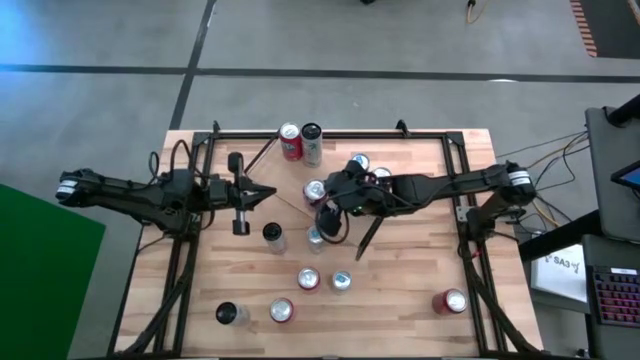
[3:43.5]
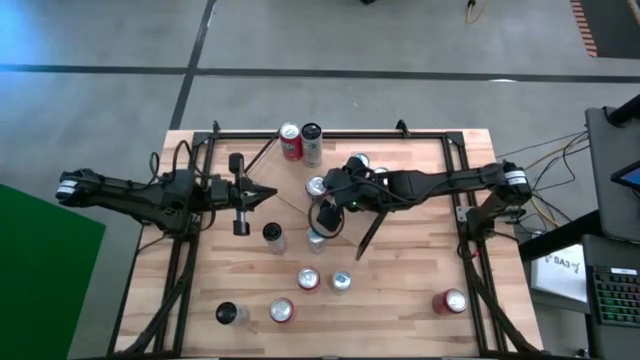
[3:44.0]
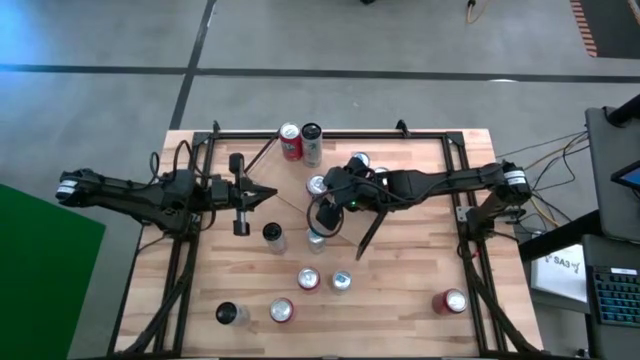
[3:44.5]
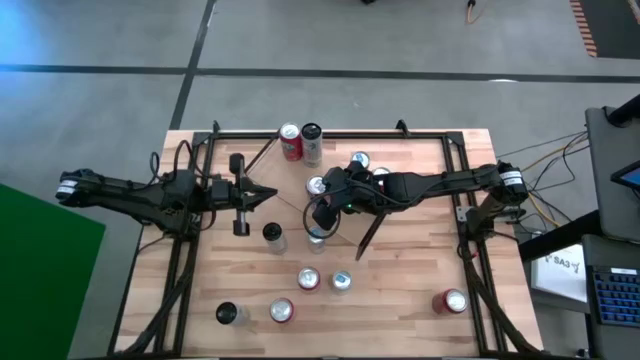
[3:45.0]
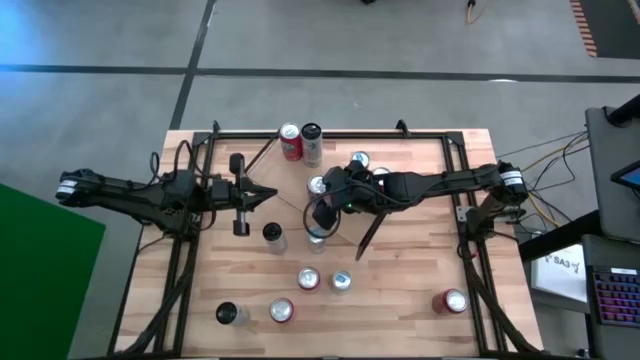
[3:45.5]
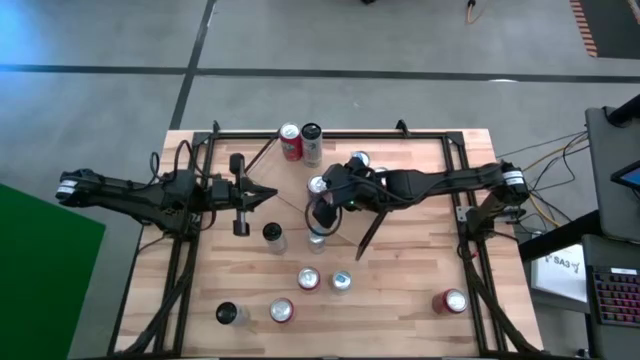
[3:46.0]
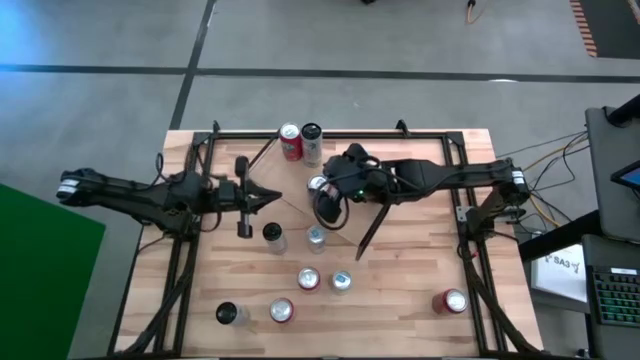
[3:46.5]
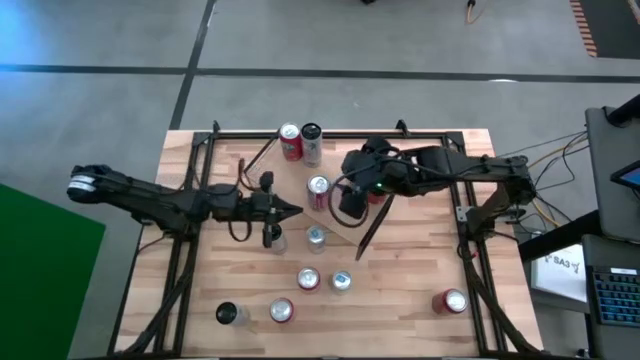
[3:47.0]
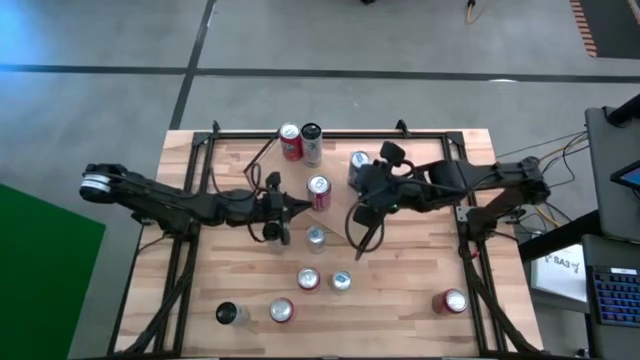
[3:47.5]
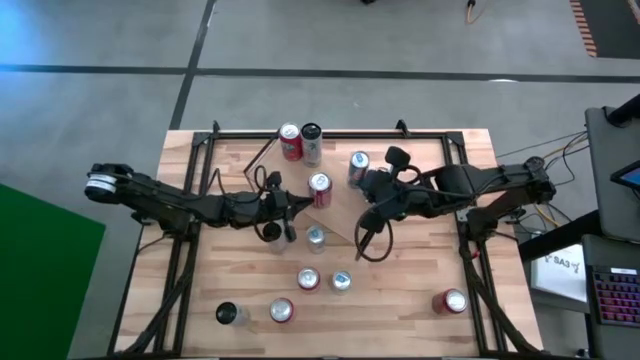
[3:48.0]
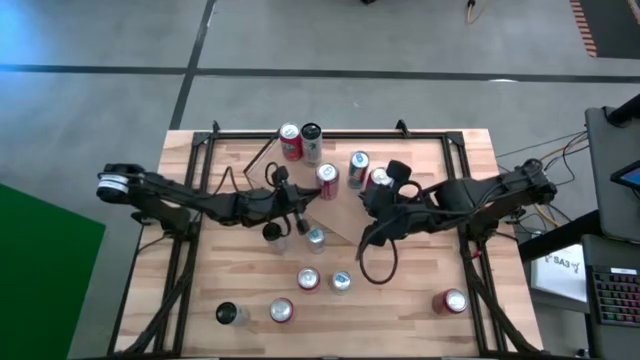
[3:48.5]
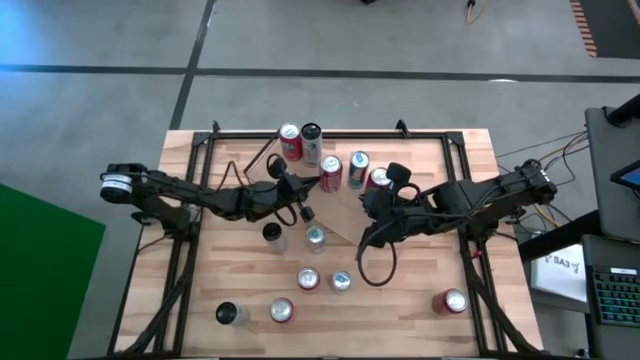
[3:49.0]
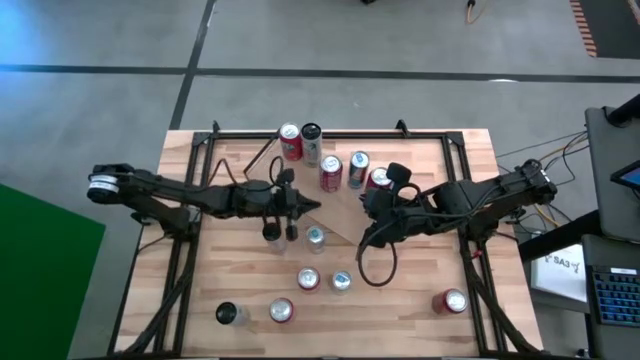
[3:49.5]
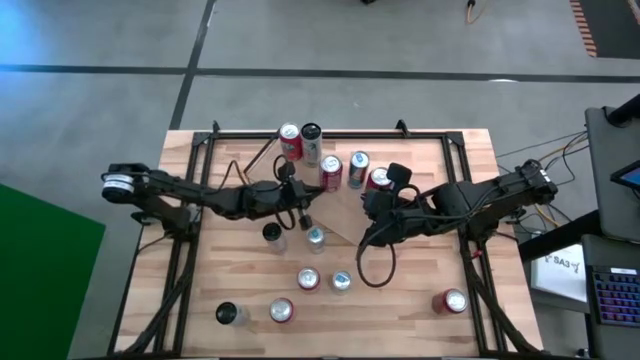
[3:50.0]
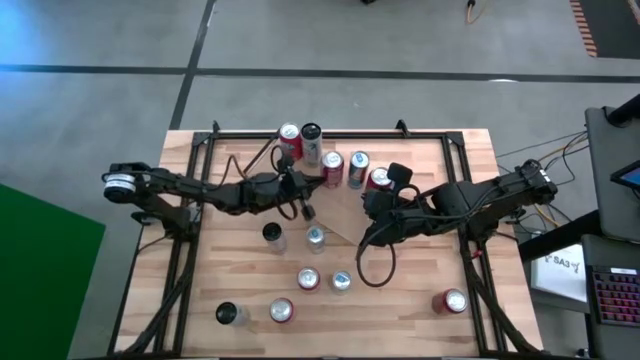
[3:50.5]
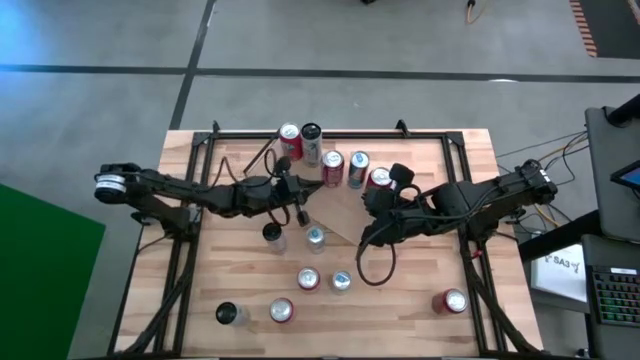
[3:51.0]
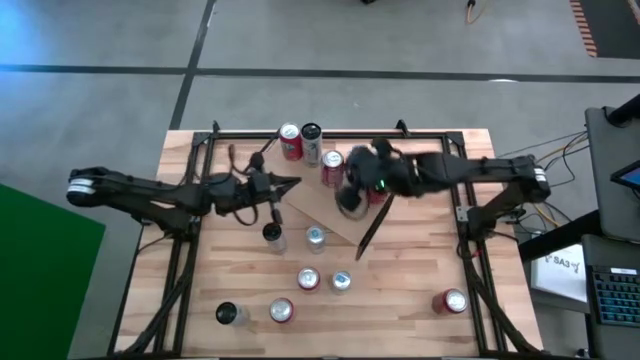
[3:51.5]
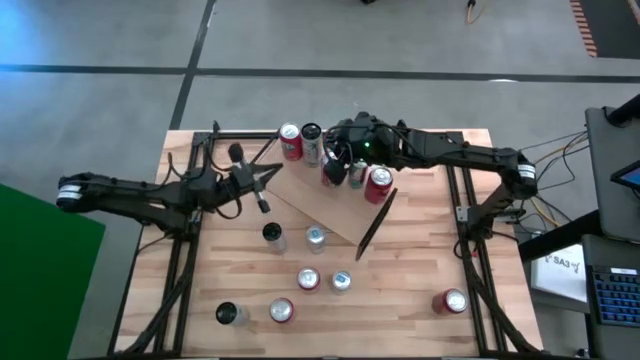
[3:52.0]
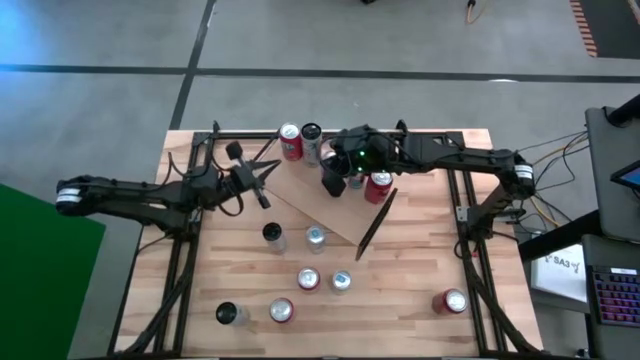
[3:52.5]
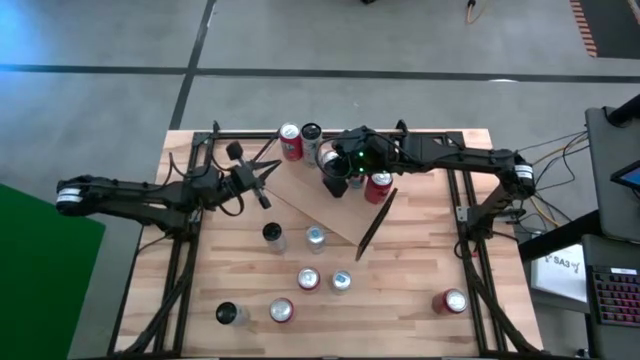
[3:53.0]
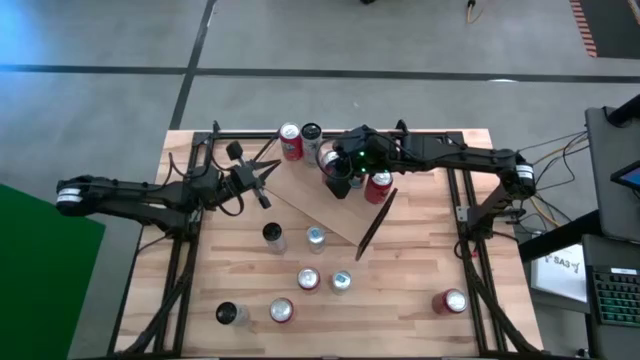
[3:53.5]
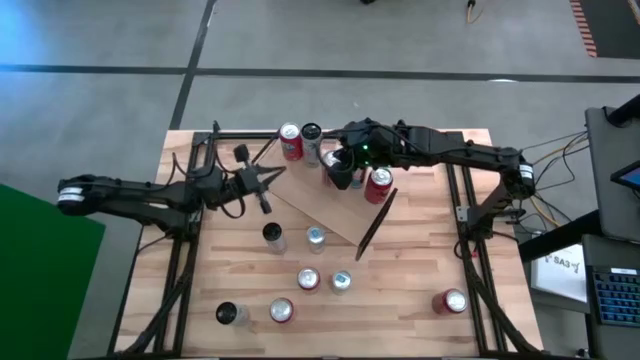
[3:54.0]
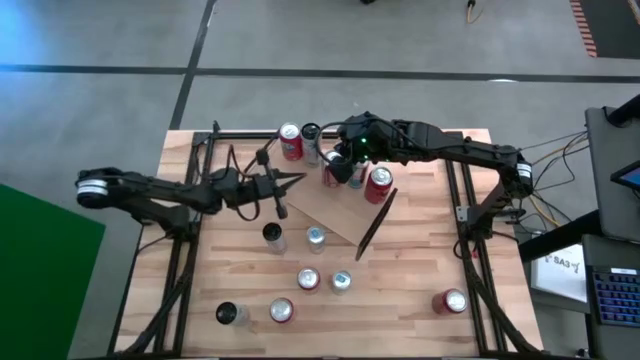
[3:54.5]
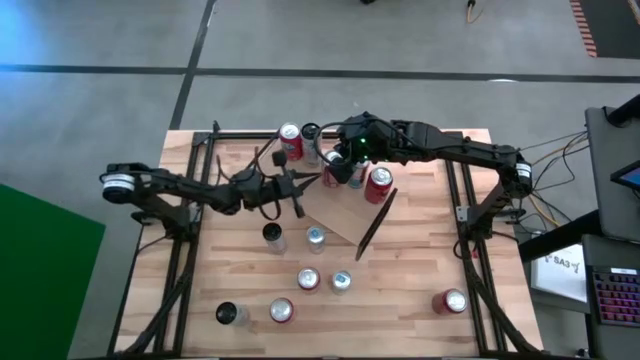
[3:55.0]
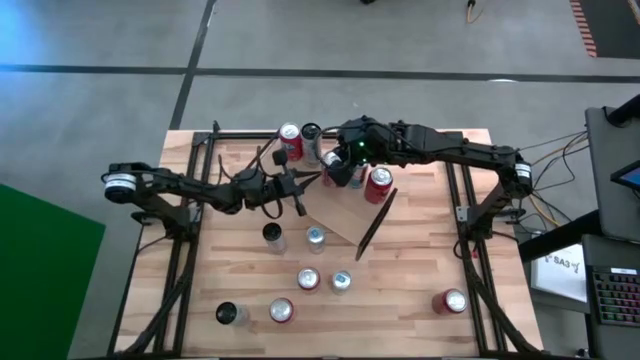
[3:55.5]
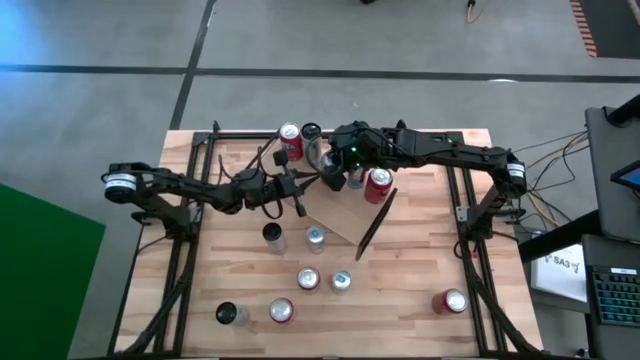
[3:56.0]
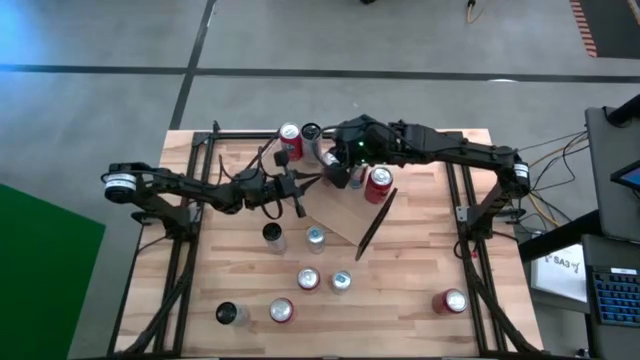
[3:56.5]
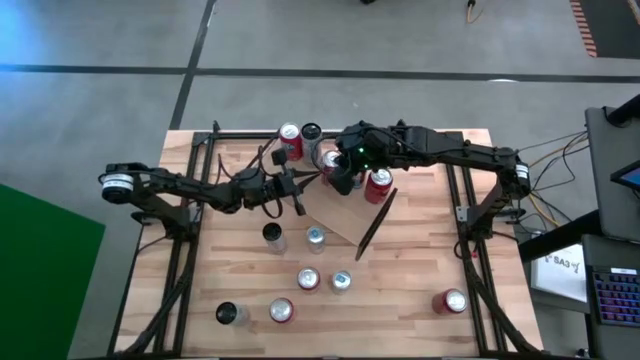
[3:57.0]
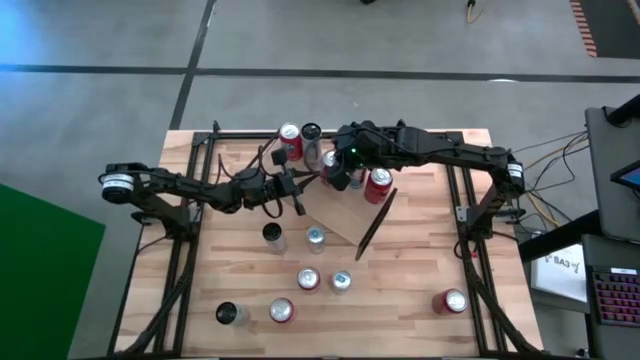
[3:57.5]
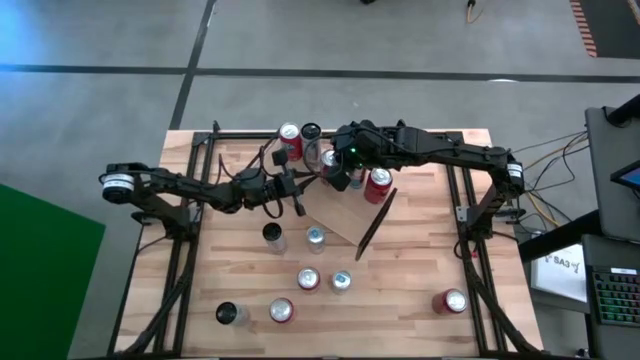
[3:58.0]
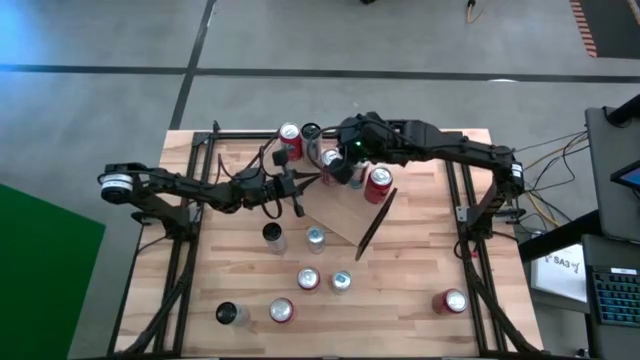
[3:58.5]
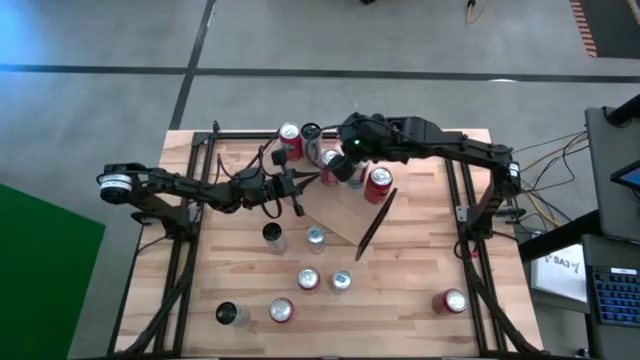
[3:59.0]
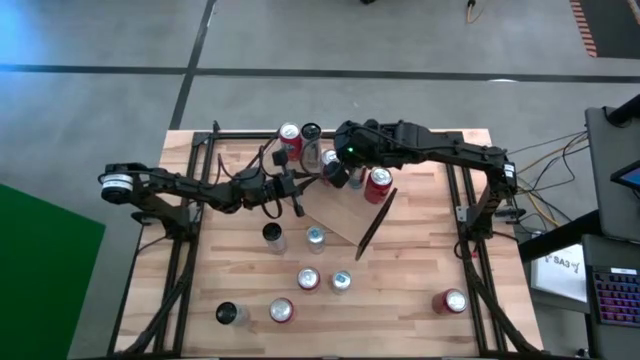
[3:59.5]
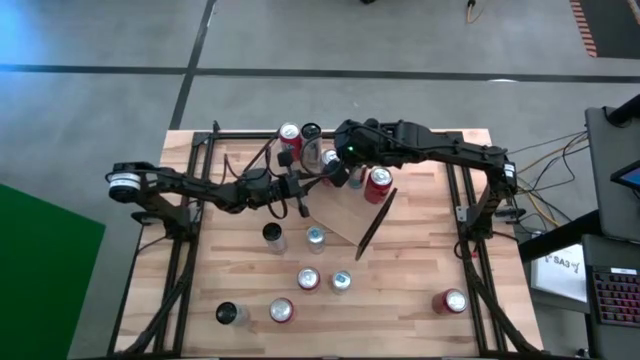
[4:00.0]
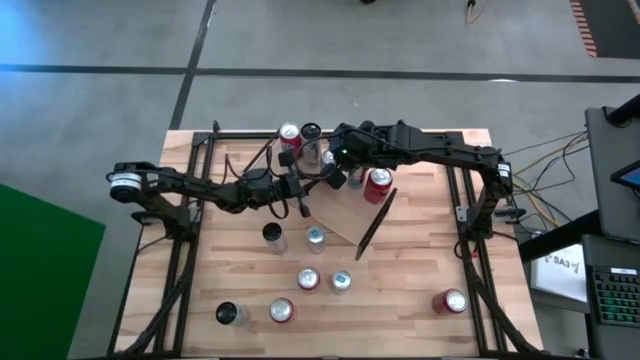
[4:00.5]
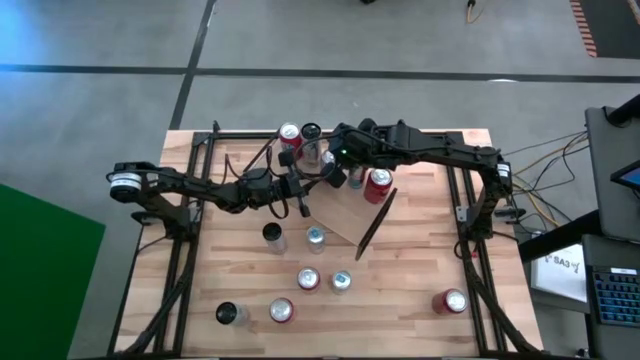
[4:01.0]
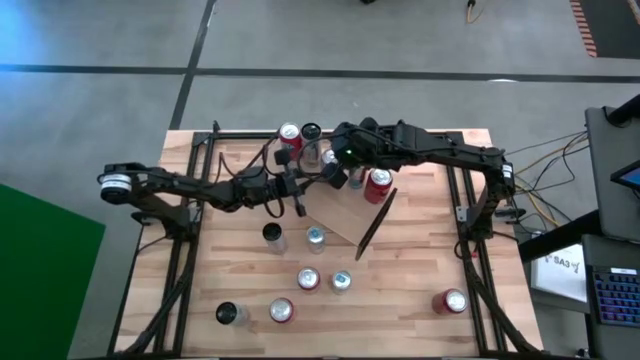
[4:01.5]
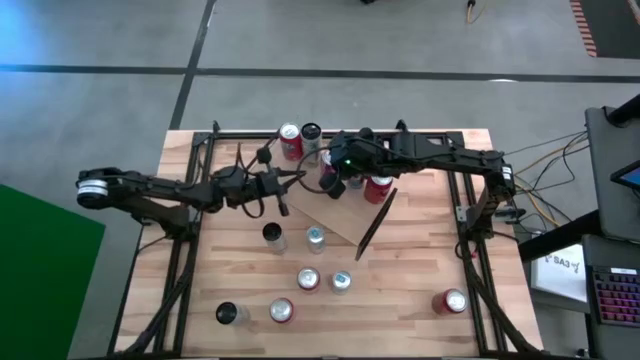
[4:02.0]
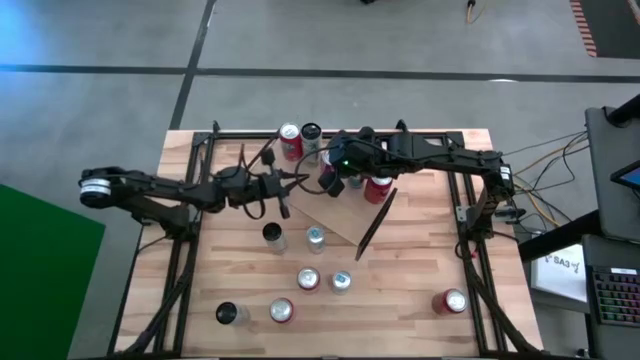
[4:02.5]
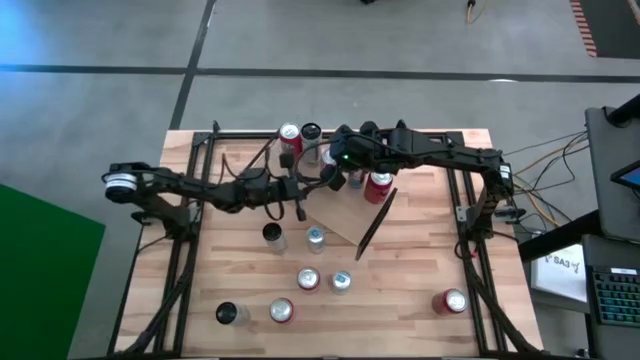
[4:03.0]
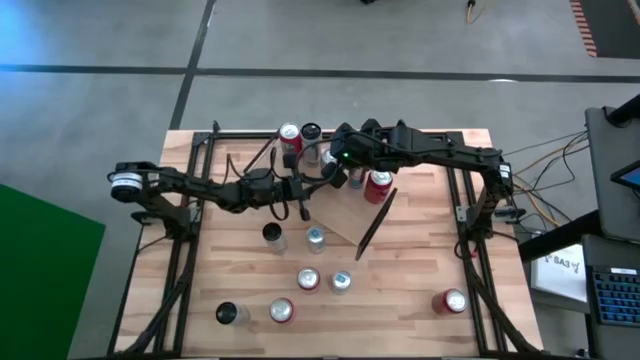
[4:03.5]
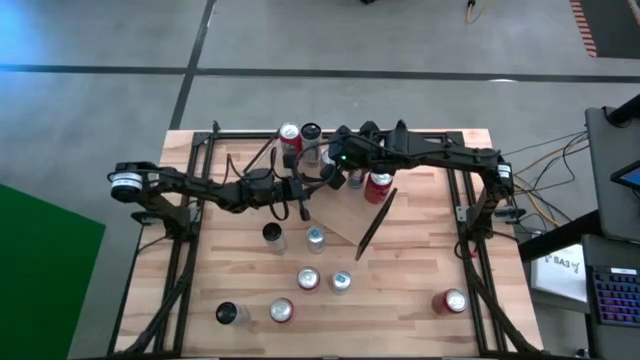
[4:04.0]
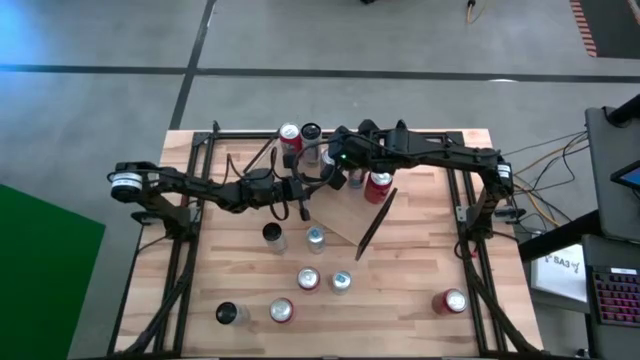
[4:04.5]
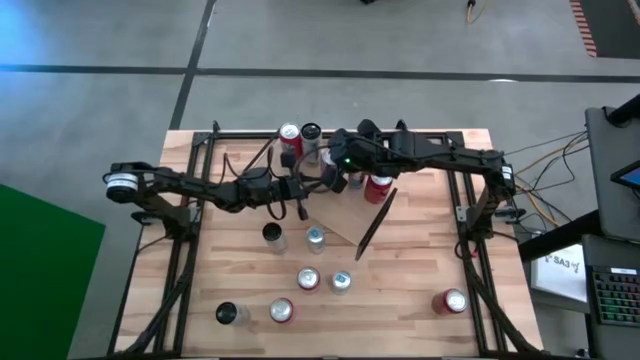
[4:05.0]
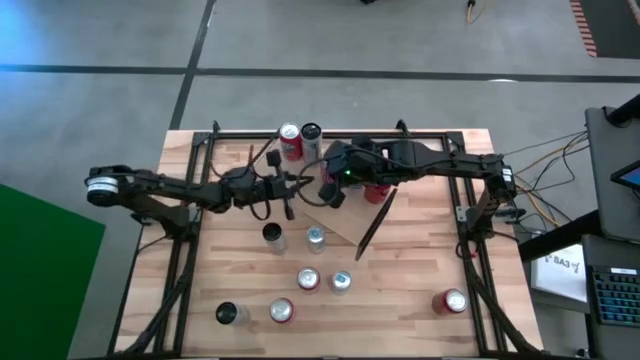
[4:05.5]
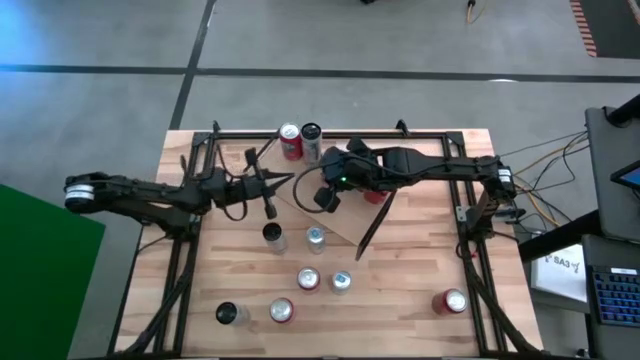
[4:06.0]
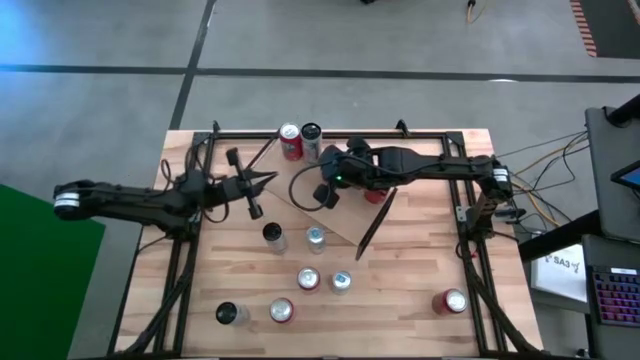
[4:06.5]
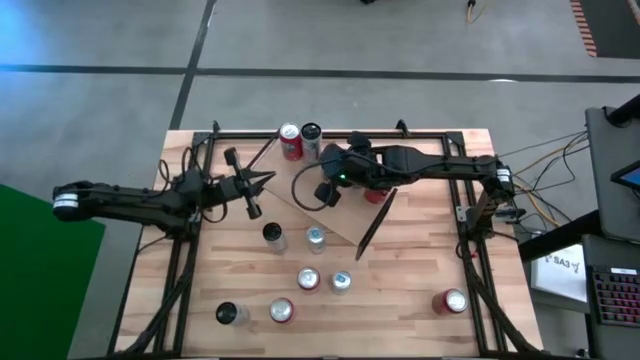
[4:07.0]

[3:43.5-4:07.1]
Task: Place canned beverage on shelf
Put the red/white soda can on the shelf
